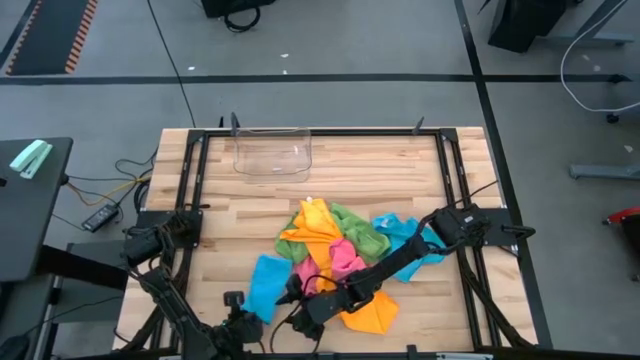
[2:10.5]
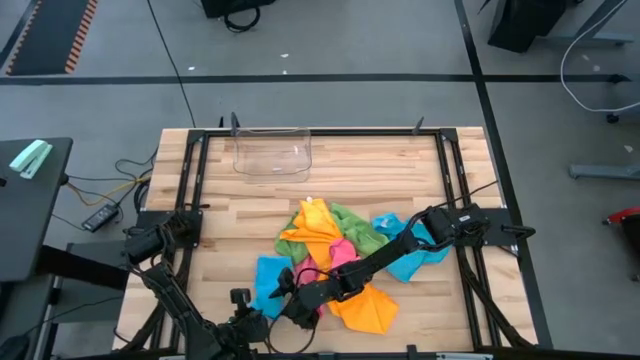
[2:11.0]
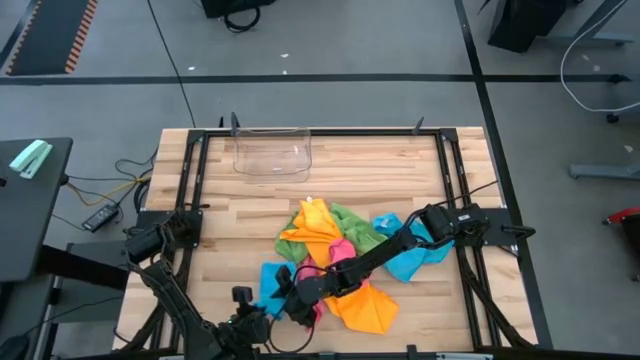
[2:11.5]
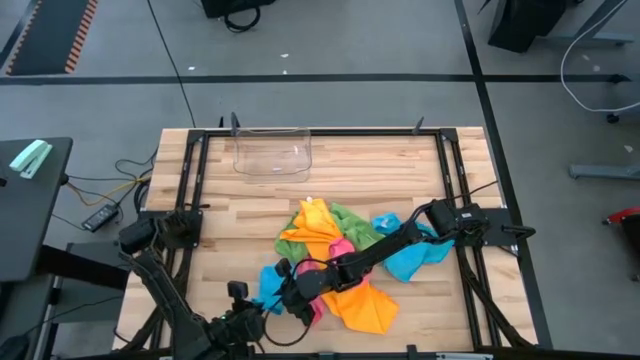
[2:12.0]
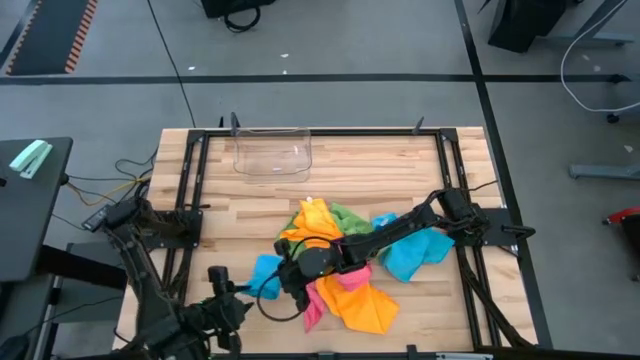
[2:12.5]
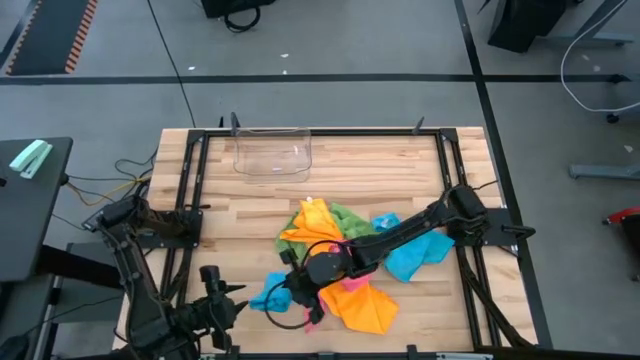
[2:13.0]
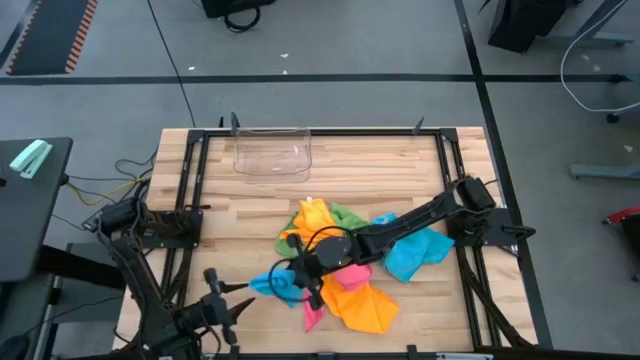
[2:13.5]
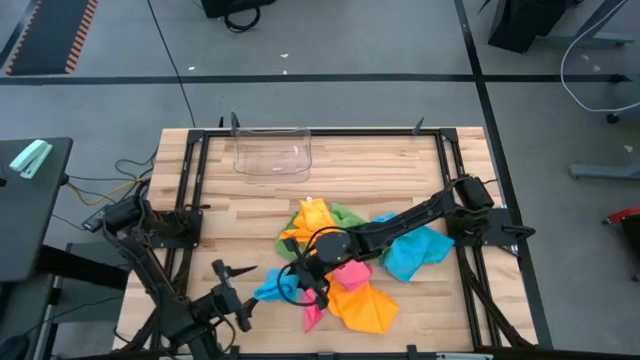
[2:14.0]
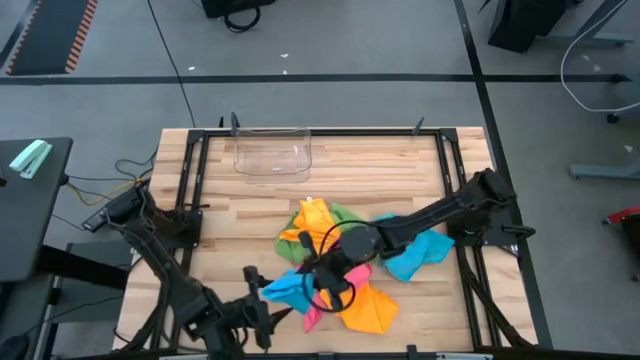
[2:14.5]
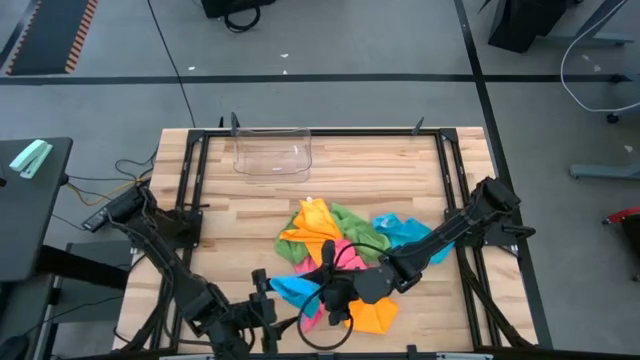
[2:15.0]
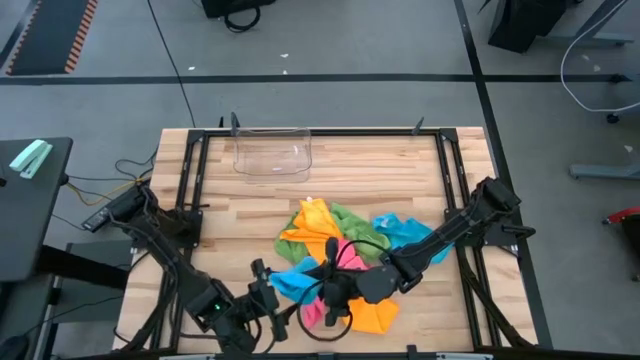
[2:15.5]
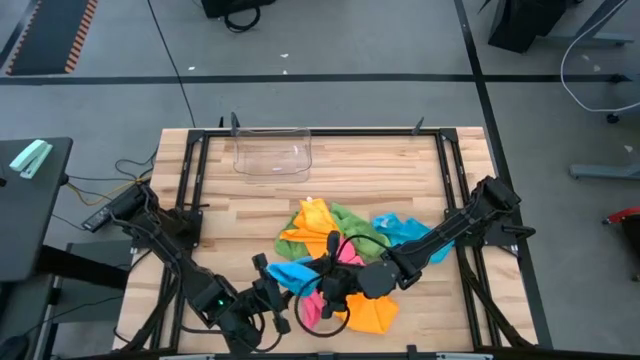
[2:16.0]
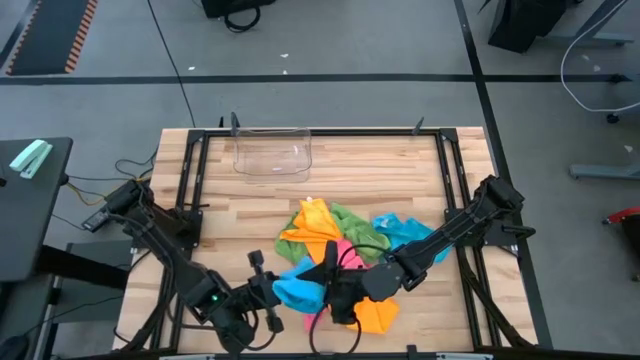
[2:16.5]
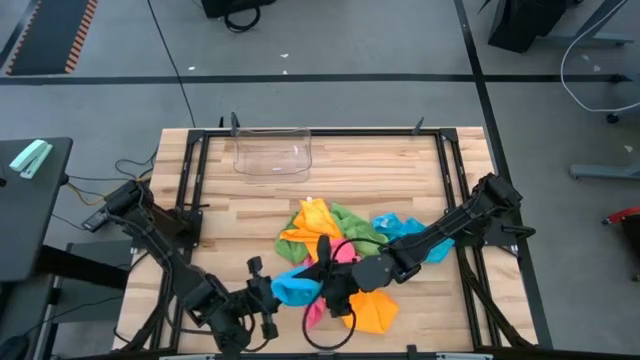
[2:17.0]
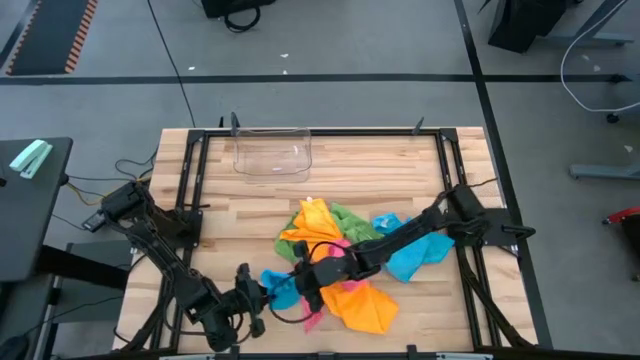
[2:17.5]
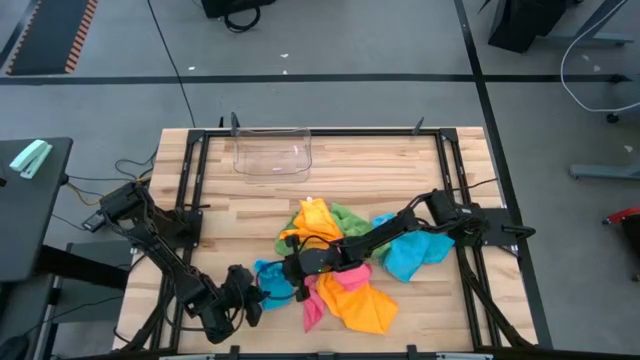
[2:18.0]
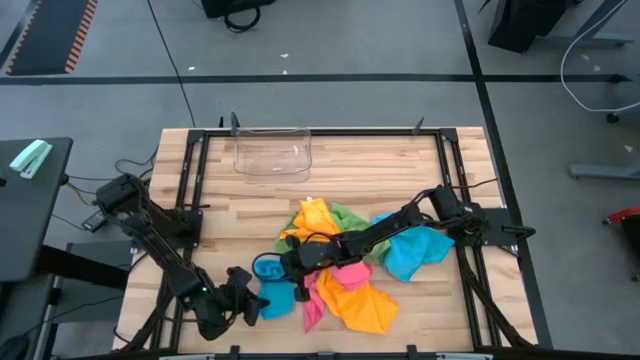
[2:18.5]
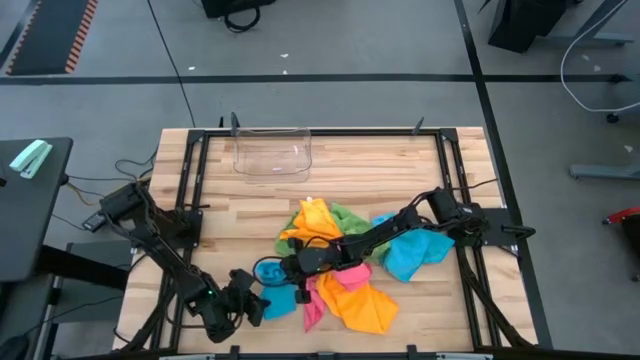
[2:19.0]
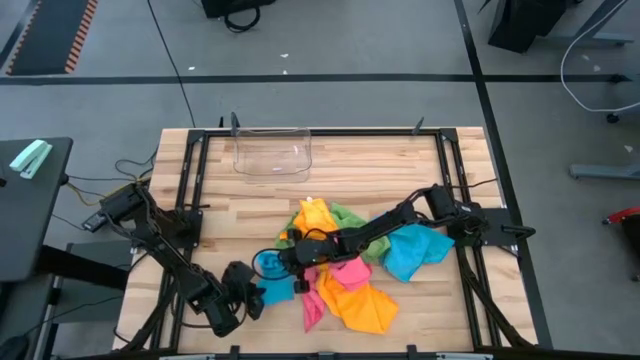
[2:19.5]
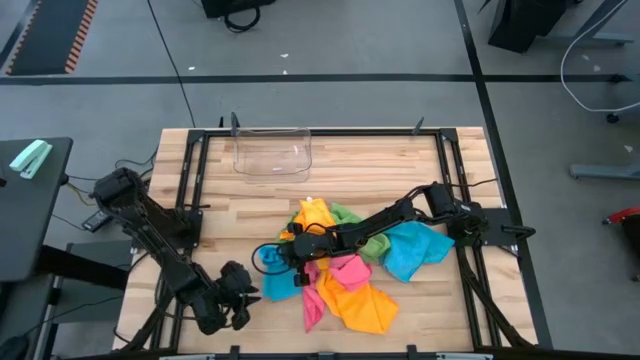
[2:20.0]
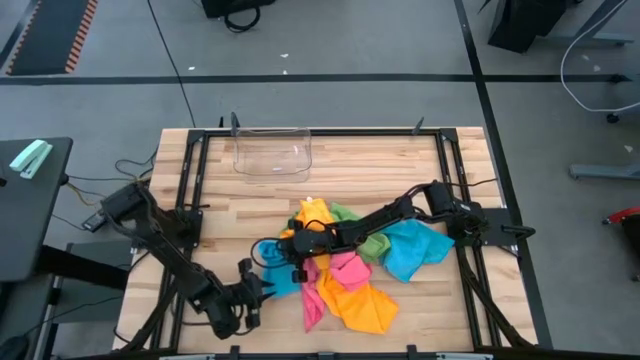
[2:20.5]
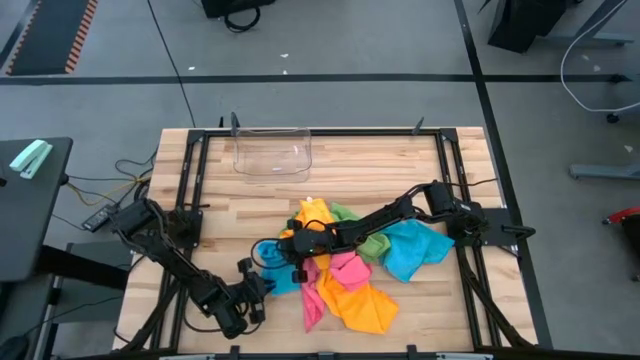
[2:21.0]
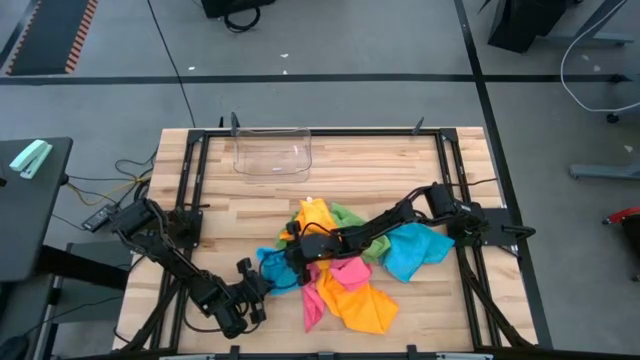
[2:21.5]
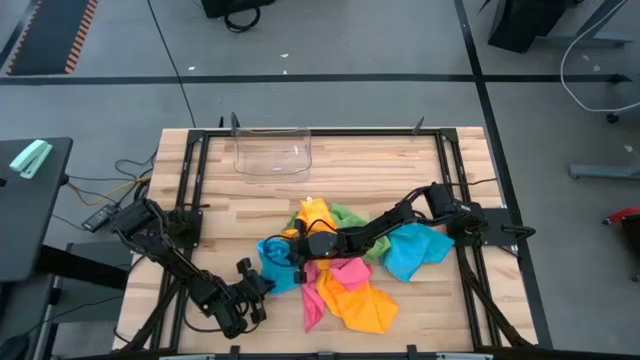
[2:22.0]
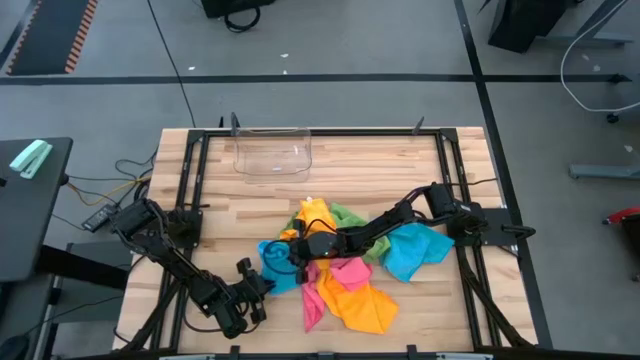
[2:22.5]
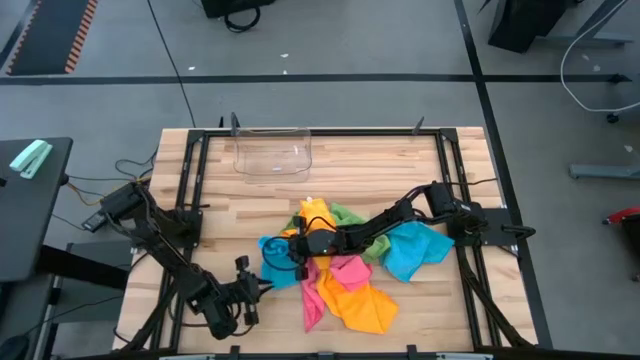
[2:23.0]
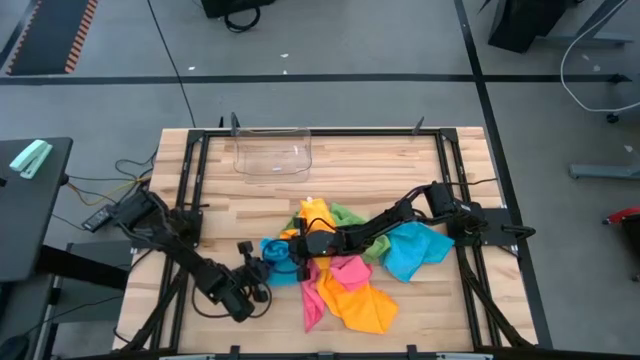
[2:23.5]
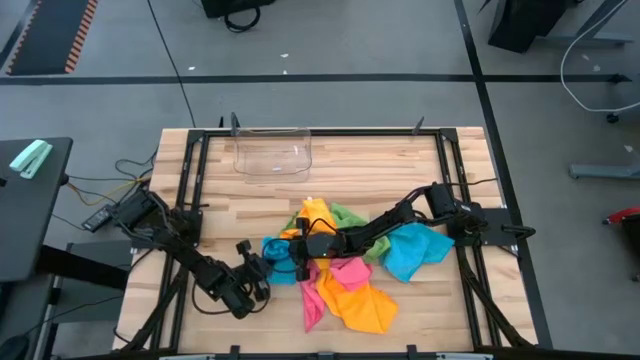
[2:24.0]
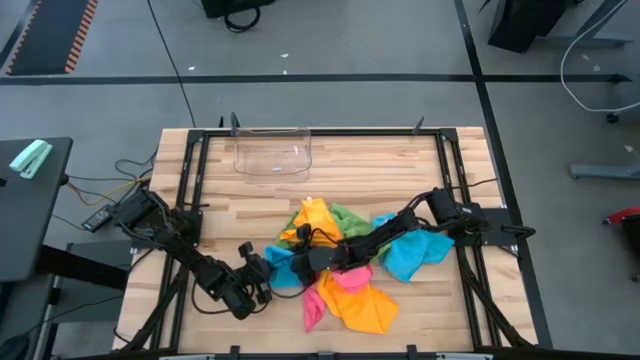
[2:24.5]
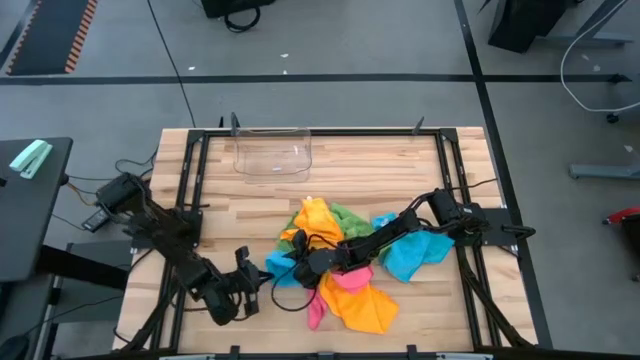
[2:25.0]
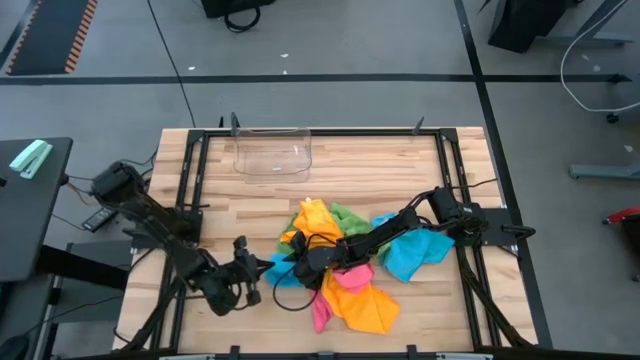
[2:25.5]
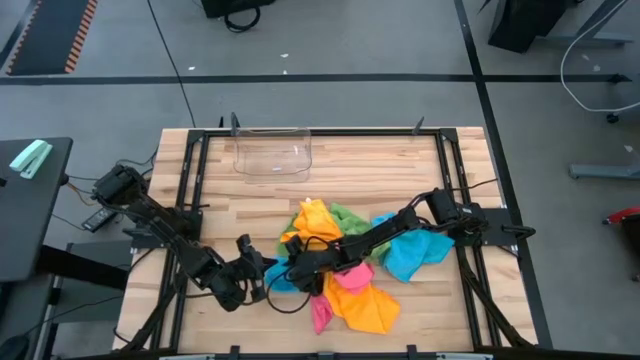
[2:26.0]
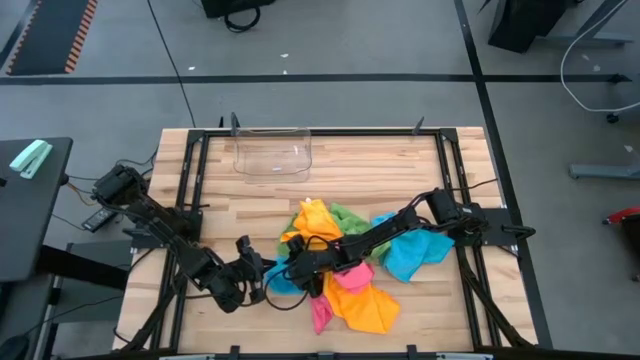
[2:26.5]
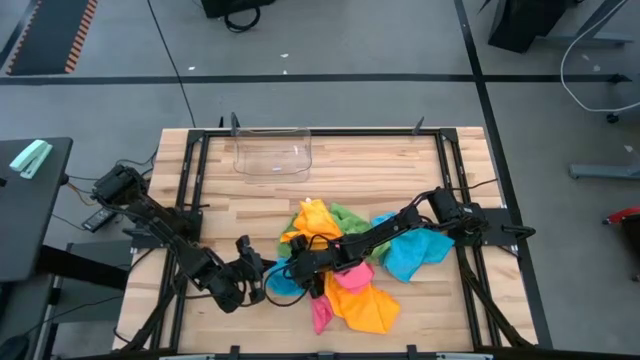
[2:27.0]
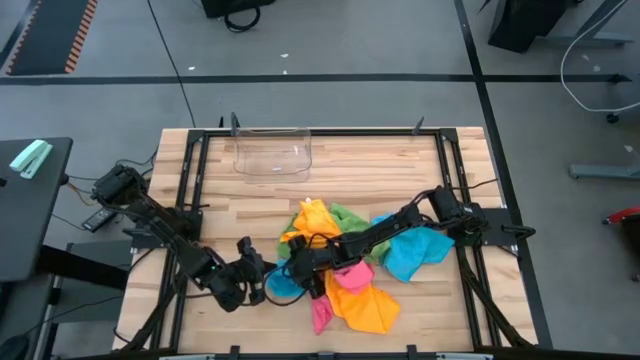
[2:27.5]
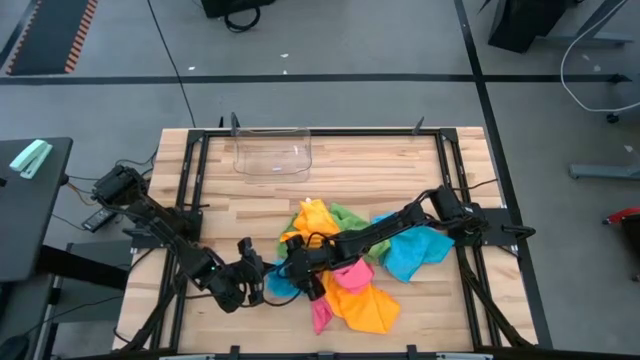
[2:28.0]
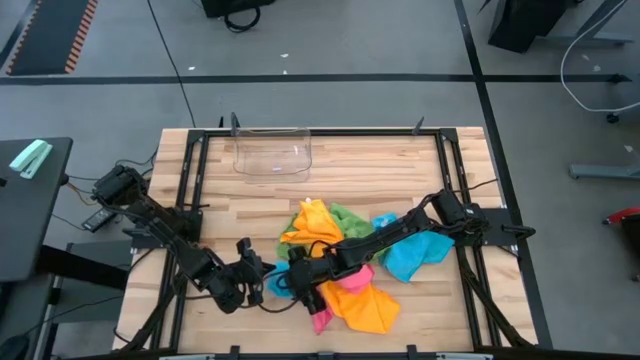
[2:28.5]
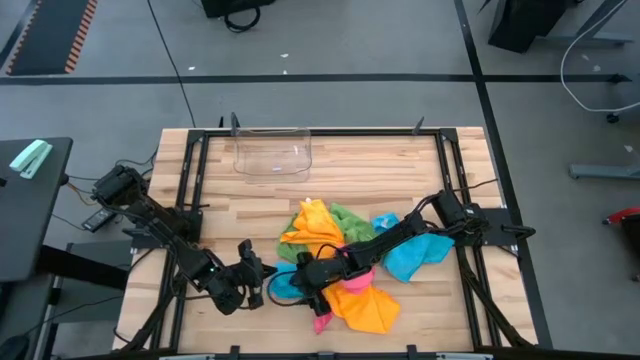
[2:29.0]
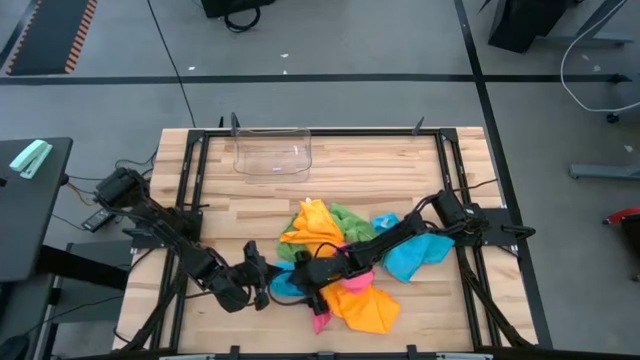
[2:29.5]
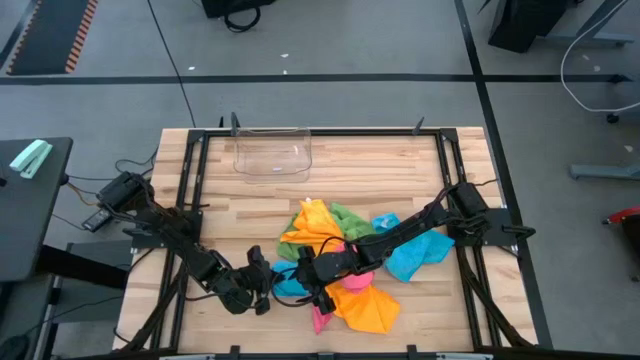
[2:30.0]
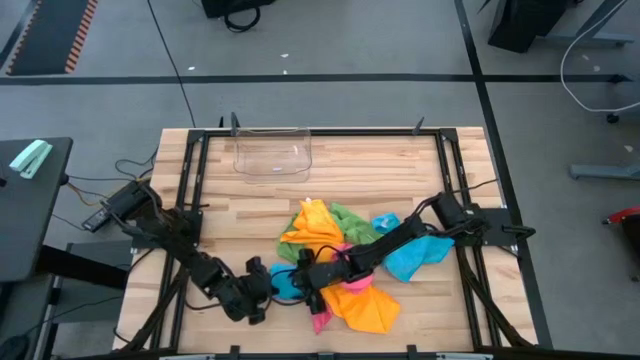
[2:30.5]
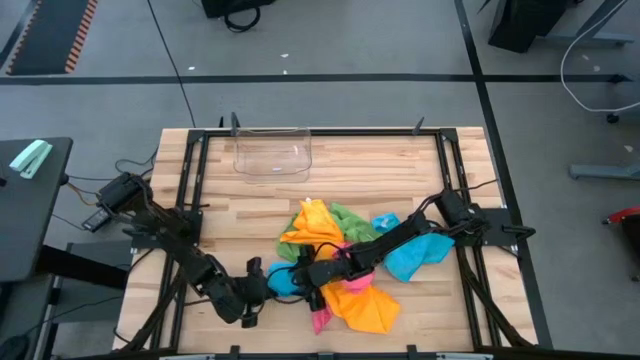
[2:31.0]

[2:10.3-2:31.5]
Task: Fold microfiber towels
Fold the left blue microfiber towel
